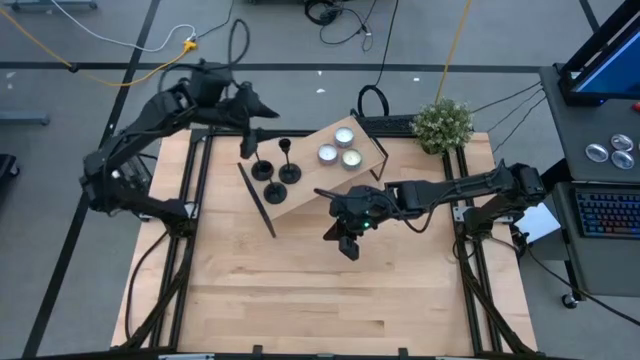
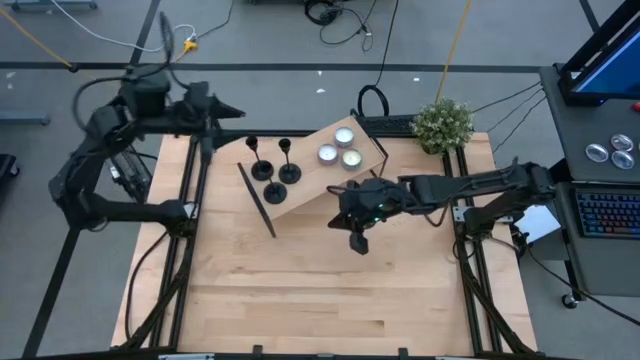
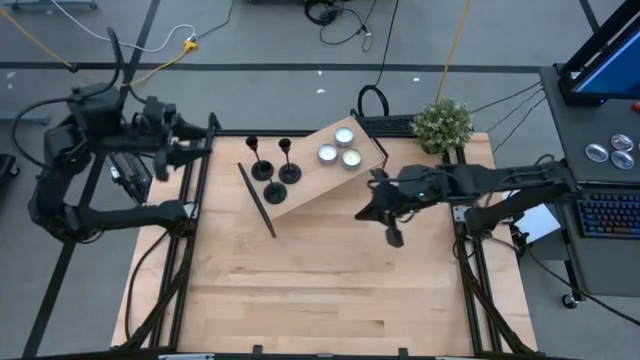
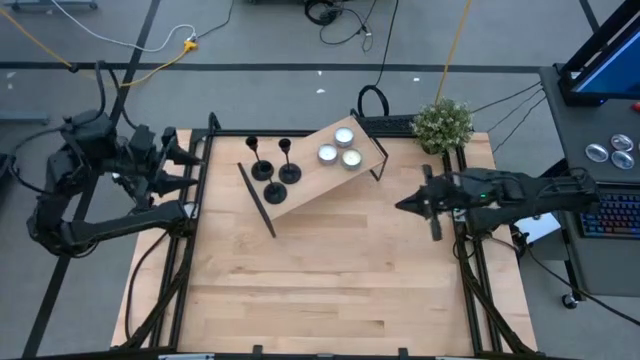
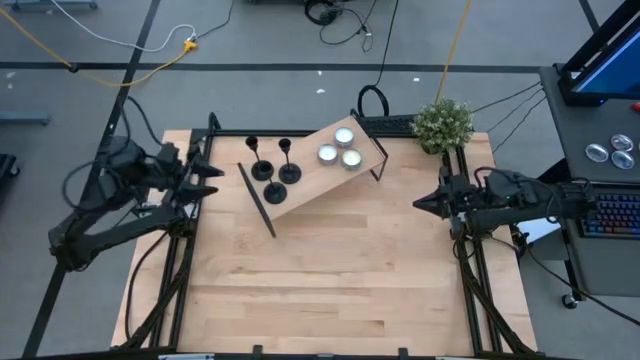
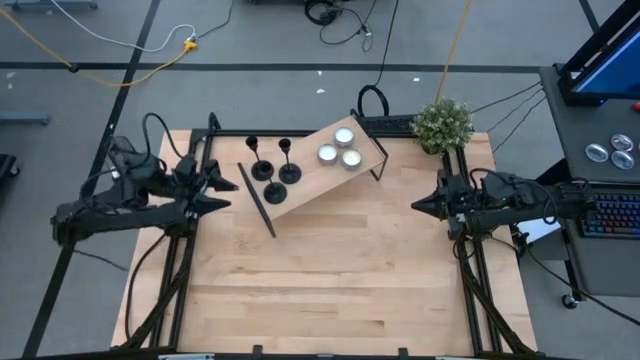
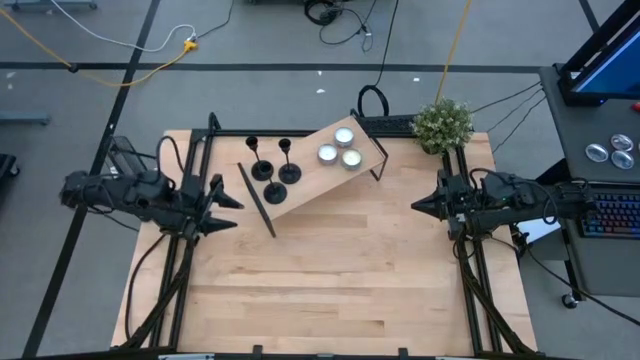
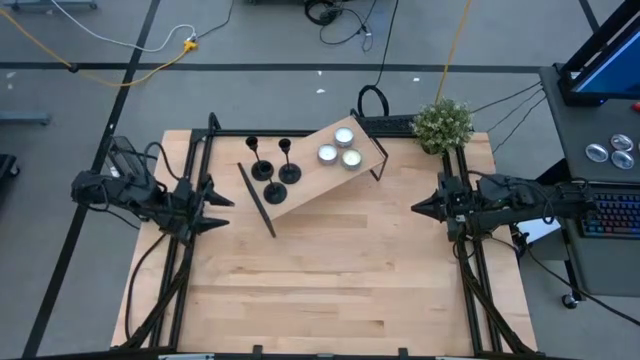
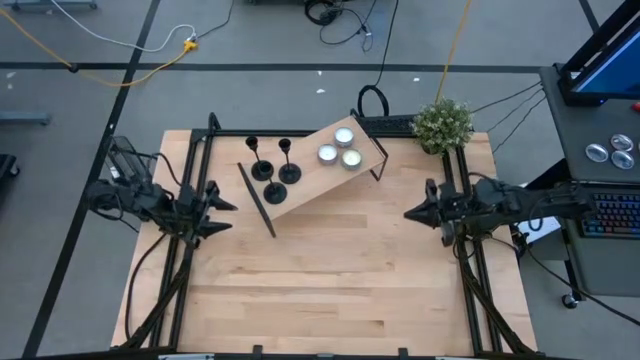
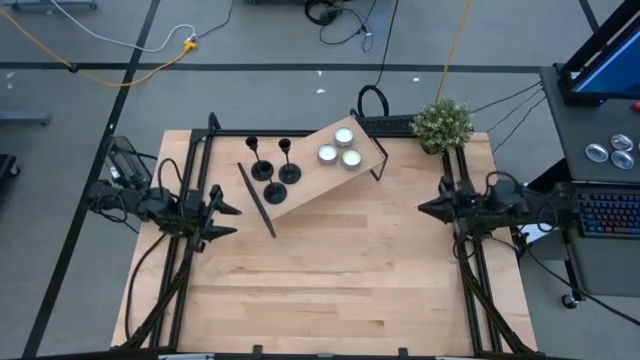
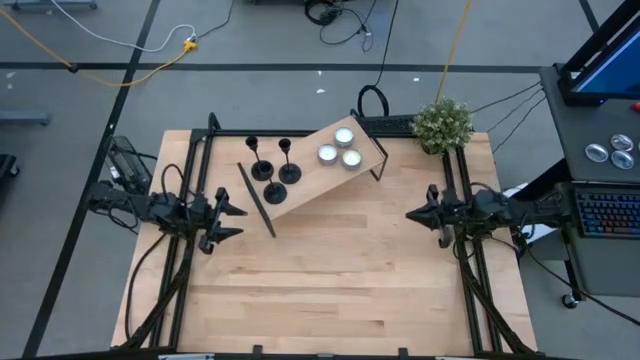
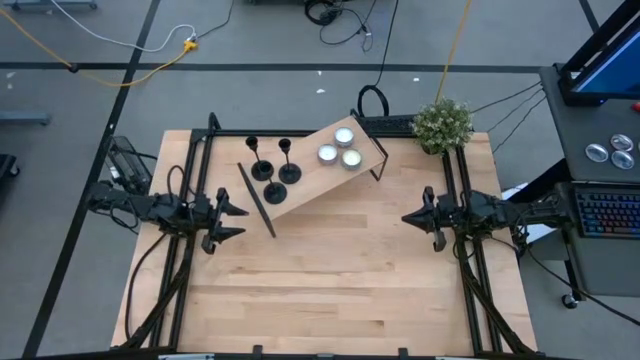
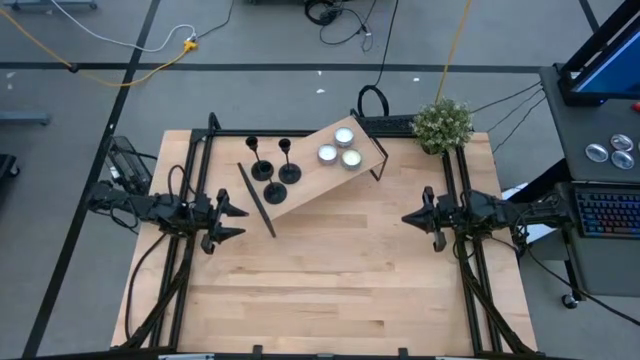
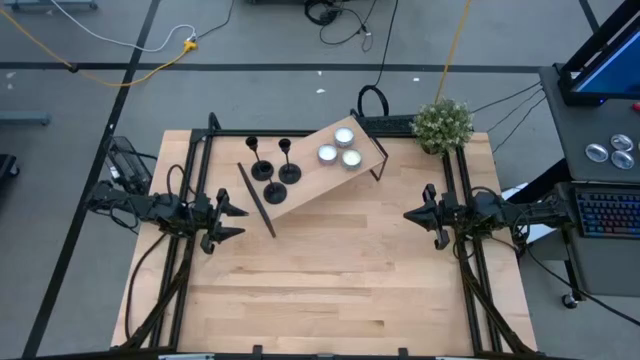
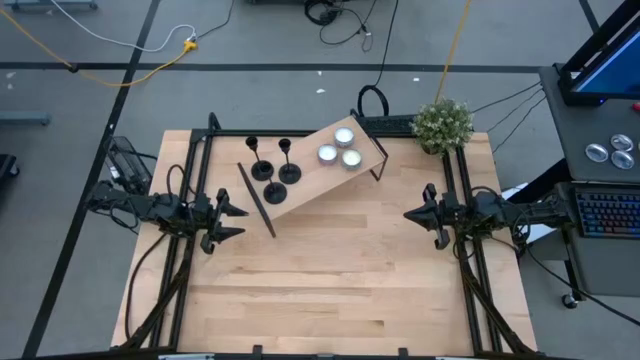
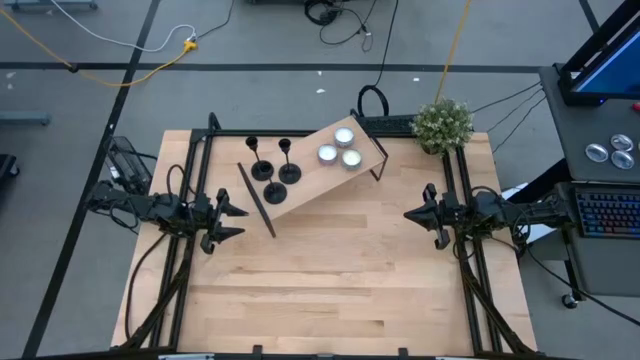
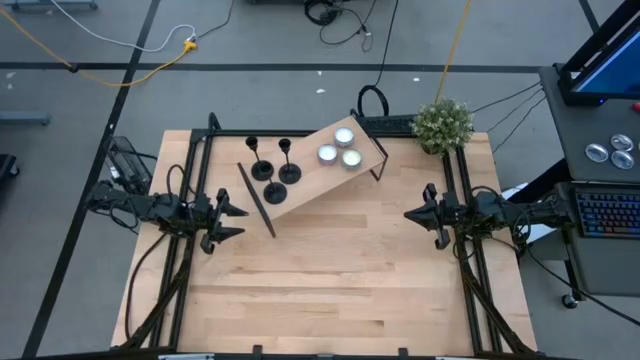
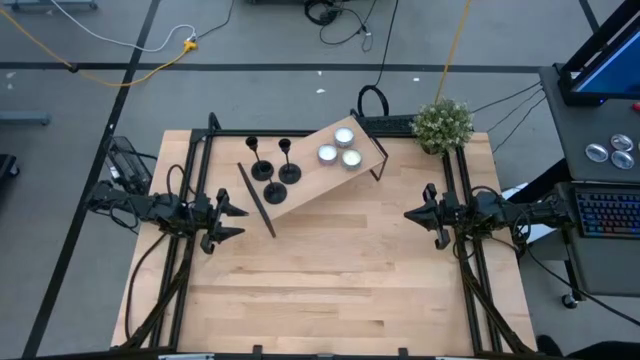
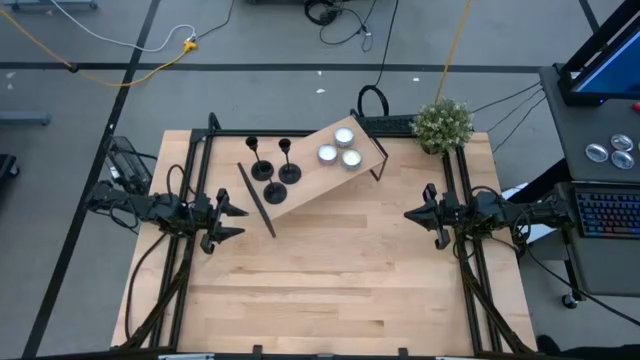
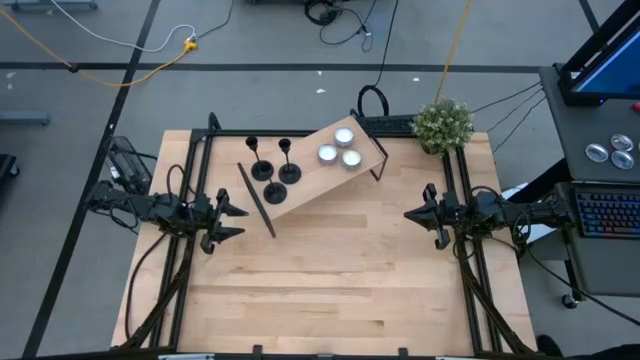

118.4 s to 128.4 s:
Task: Pick & Place candle stick holders
Return to Home Position
